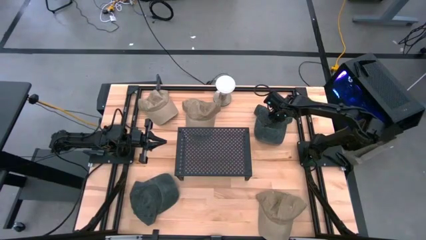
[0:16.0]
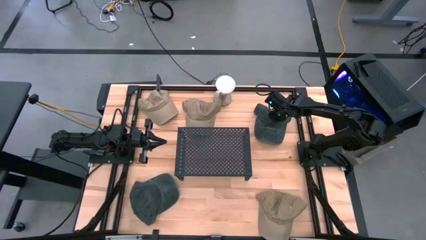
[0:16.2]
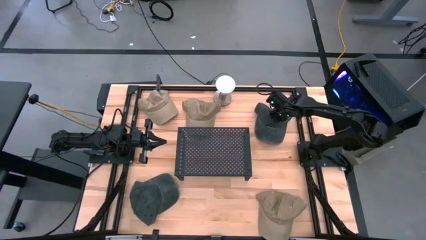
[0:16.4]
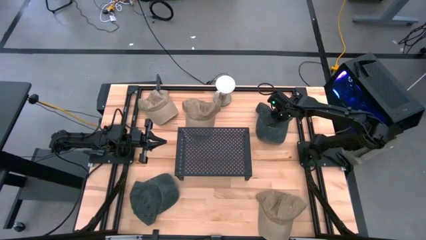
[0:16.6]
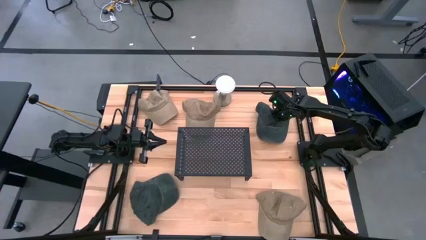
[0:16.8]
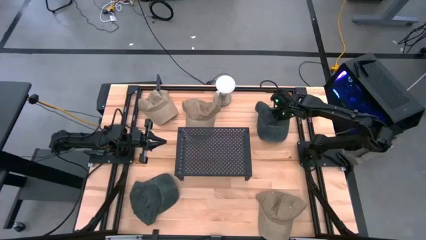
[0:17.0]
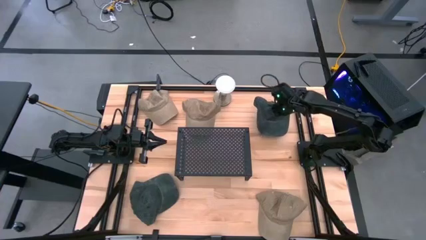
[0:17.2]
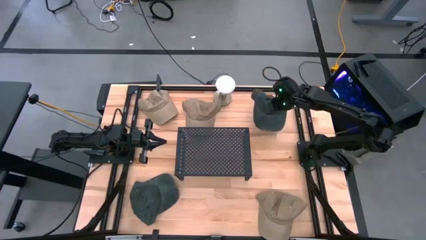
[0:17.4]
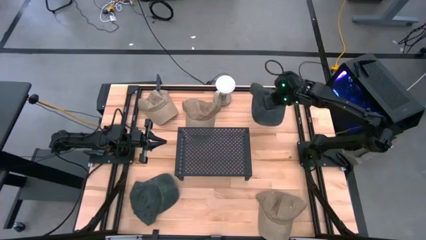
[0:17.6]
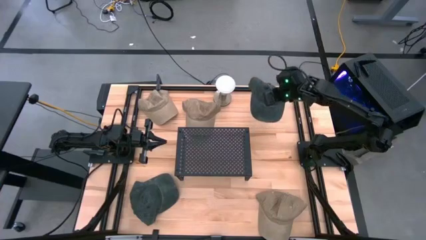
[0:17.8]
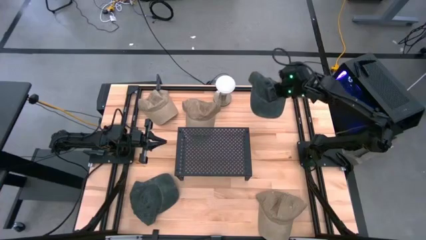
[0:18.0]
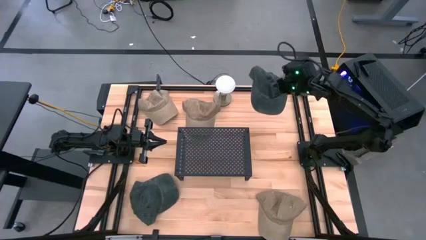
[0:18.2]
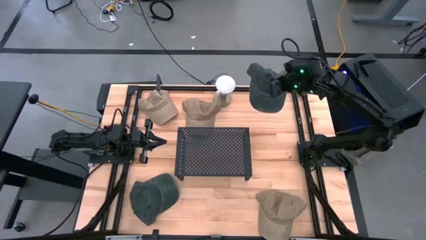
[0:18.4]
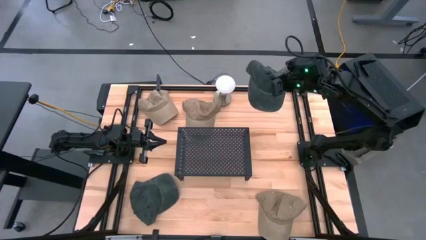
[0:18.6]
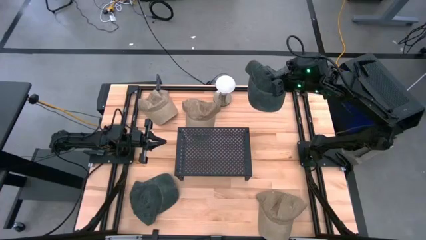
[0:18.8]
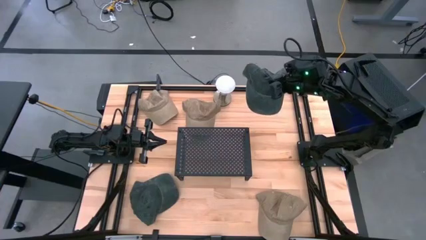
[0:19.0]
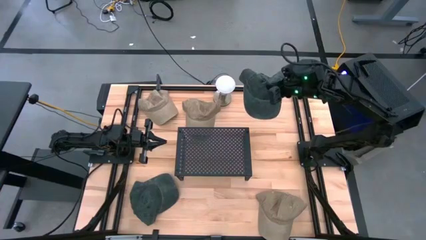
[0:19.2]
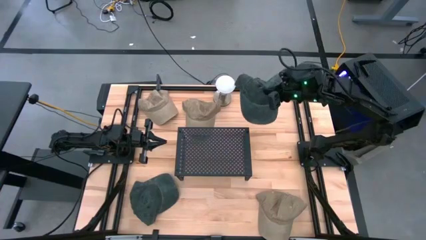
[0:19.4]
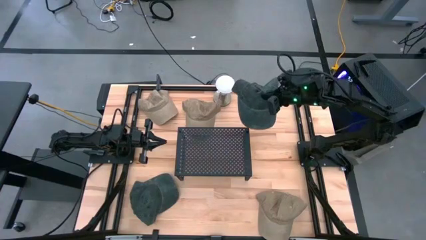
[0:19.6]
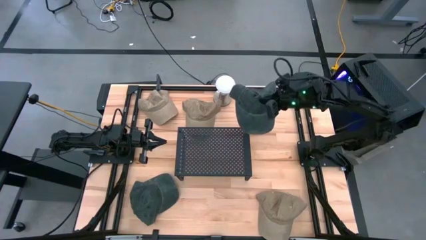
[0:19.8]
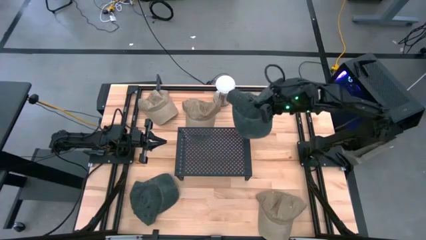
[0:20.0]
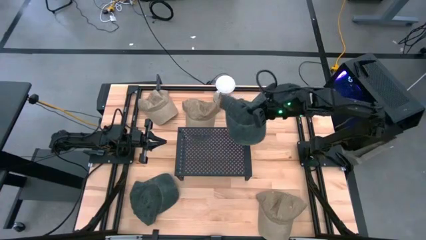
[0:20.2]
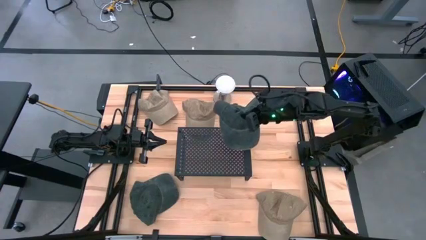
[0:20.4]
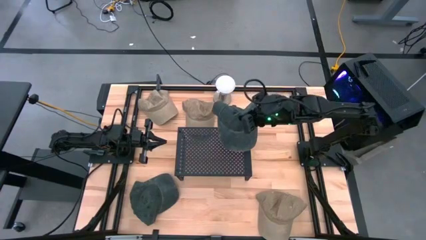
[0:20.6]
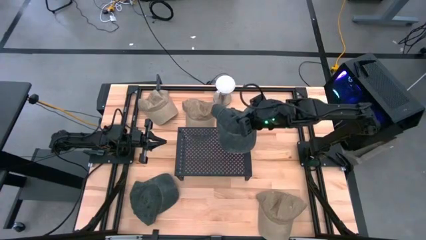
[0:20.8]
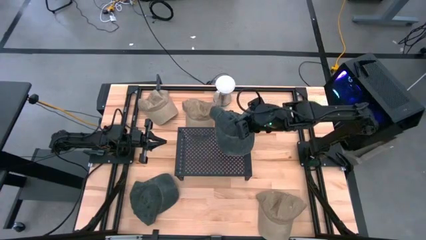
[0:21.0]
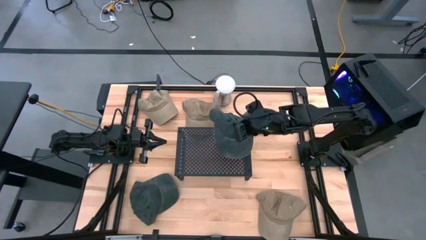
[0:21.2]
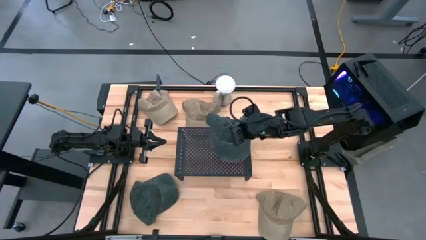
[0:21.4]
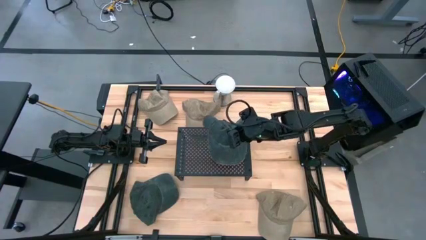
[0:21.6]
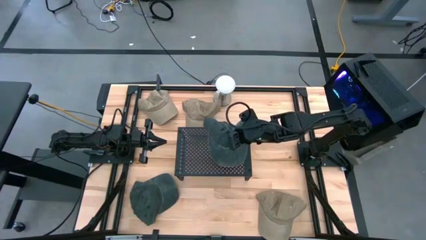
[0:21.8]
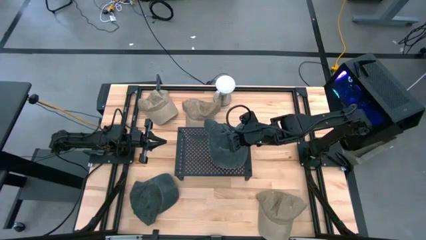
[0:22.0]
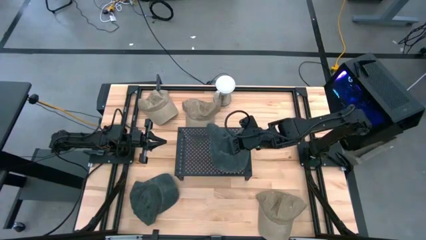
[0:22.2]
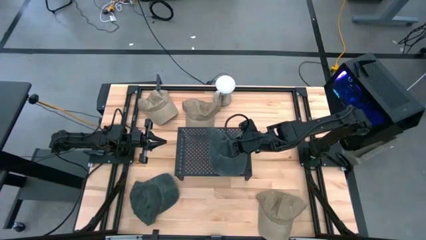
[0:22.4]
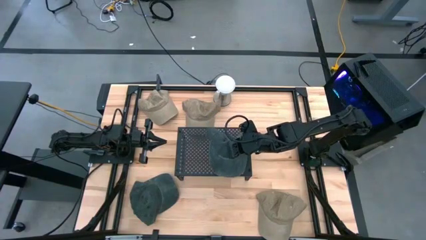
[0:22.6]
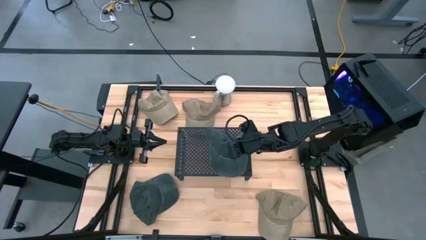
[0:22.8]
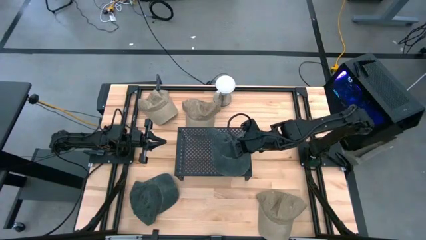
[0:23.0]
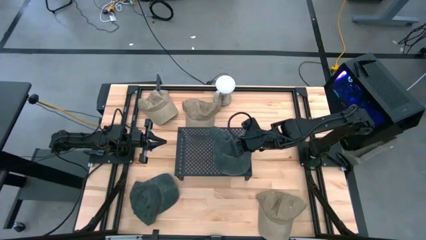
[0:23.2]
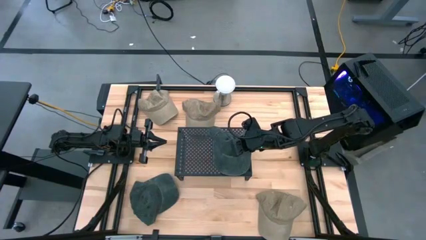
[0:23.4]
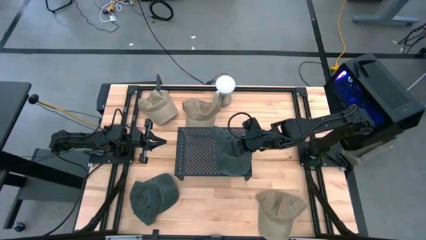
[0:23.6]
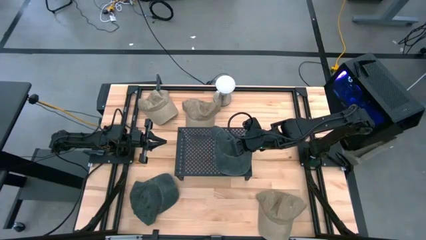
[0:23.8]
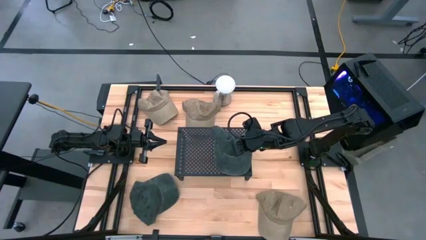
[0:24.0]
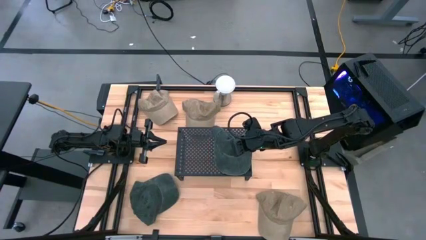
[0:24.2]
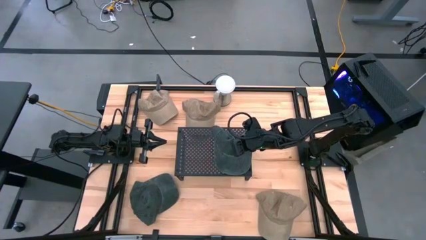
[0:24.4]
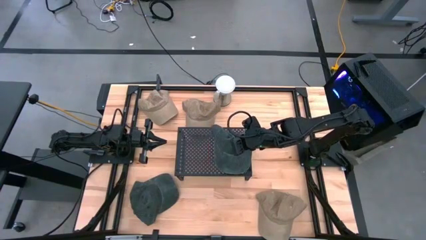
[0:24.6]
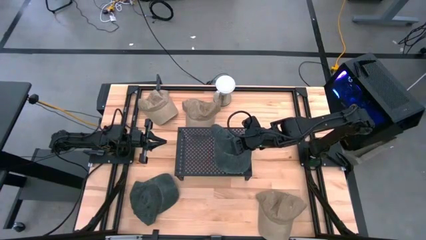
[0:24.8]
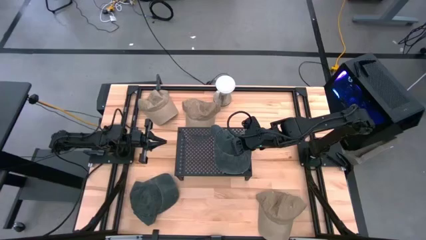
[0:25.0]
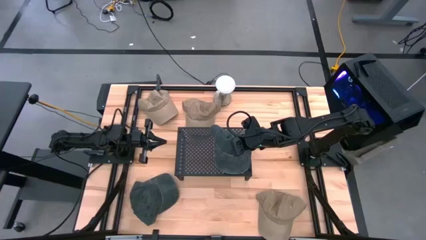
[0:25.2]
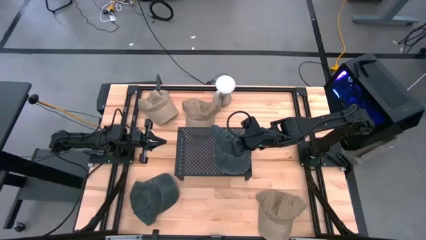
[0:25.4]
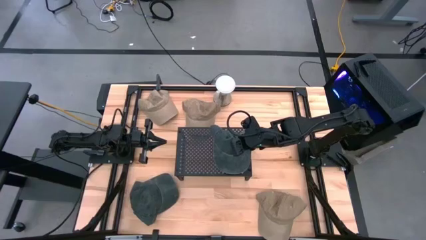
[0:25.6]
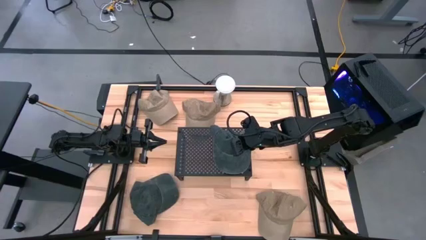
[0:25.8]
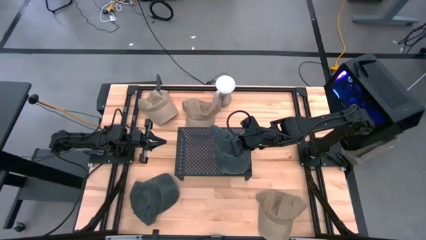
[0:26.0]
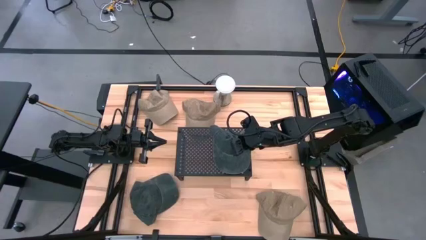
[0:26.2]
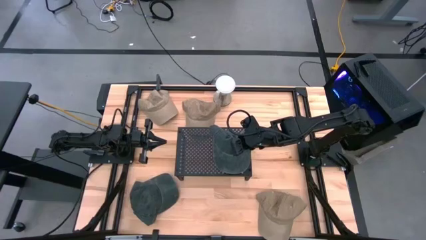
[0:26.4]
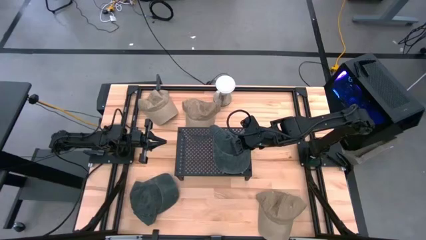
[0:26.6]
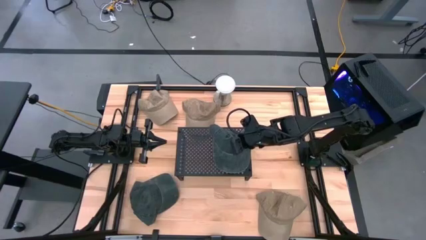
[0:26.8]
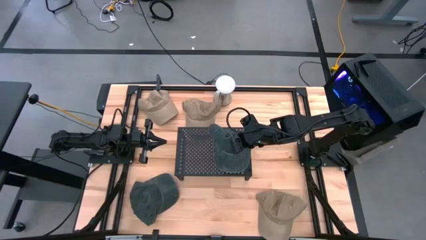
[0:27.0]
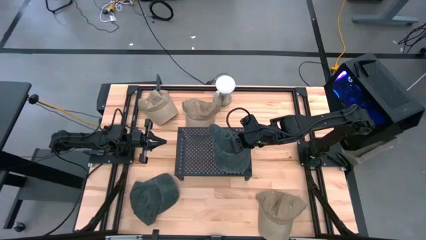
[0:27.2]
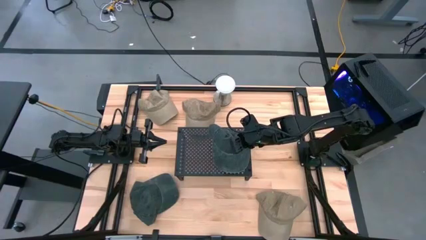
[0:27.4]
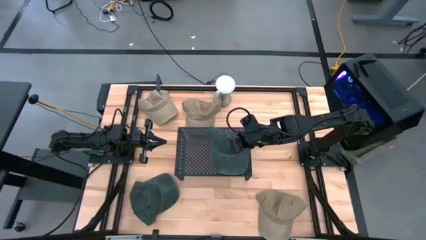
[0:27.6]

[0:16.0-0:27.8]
Task: Pick & Place hat
Put the top black cap on the shelf
